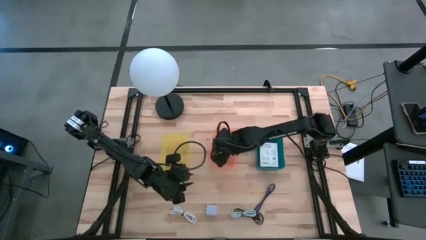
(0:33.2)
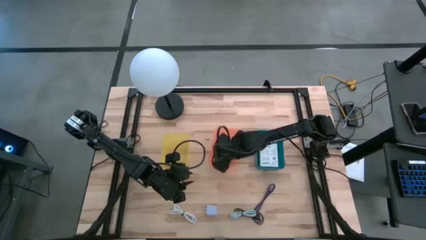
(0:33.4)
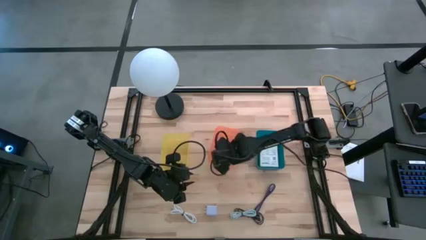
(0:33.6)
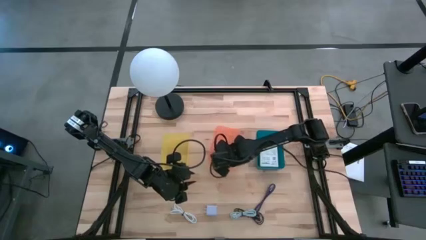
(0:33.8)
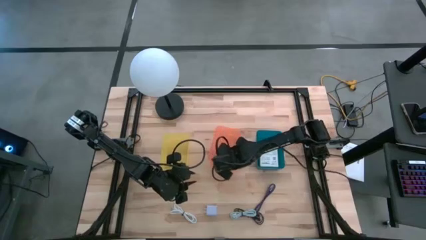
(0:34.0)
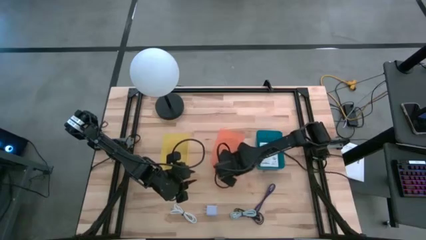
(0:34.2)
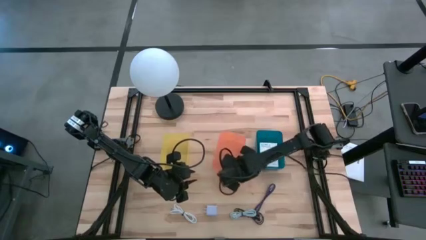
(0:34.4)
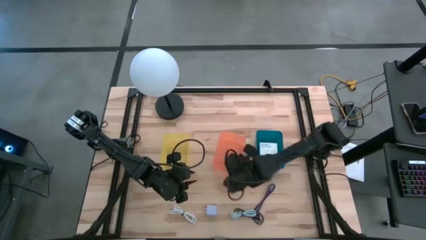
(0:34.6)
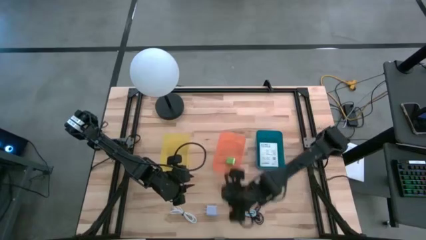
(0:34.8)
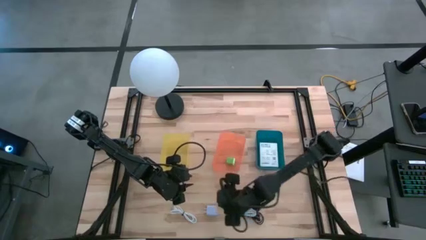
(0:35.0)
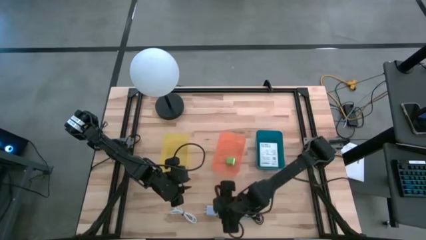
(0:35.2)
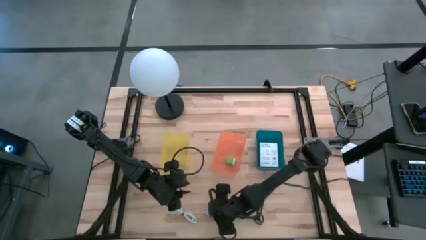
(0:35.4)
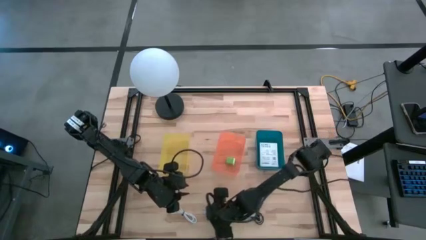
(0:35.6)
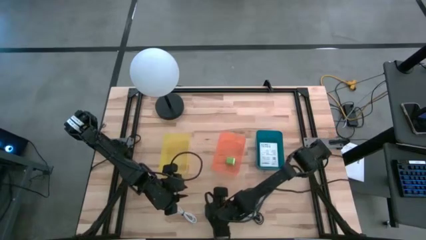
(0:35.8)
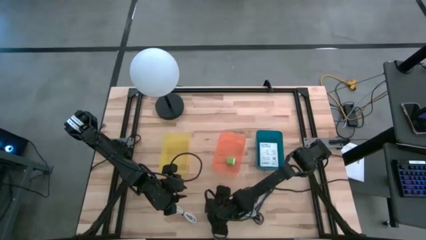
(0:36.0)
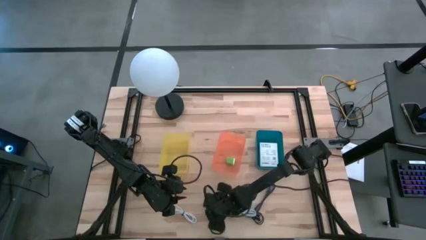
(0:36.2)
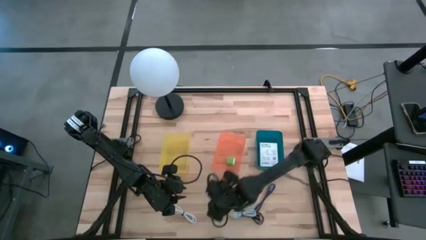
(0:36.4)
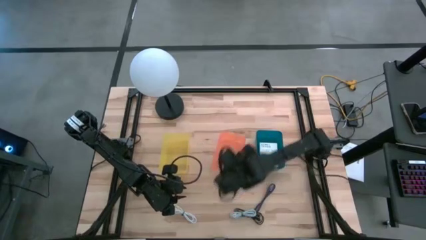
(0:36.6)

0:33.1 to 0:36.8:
Task: Pick and place items into bin
Put the blue charger adapter into the orange bin

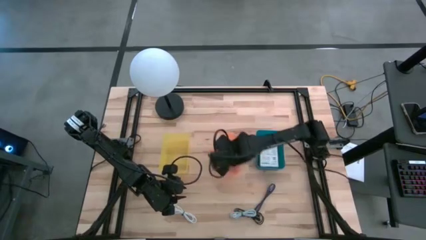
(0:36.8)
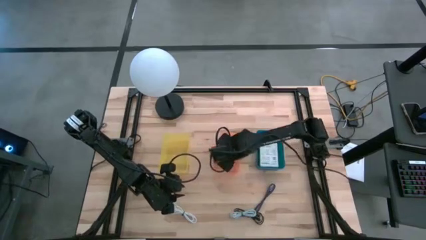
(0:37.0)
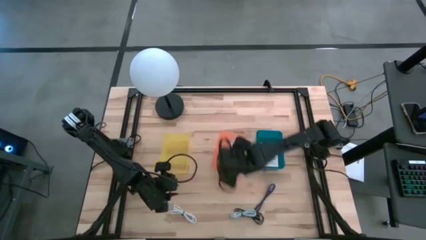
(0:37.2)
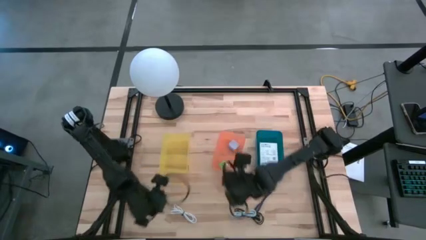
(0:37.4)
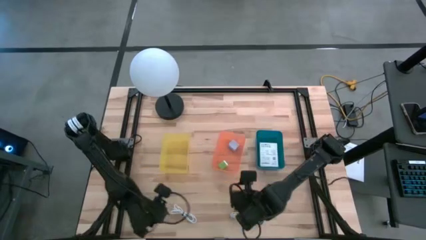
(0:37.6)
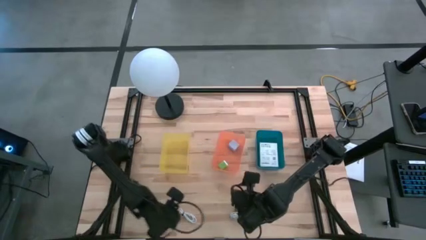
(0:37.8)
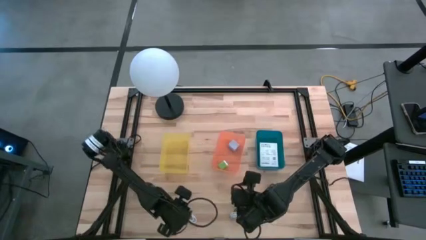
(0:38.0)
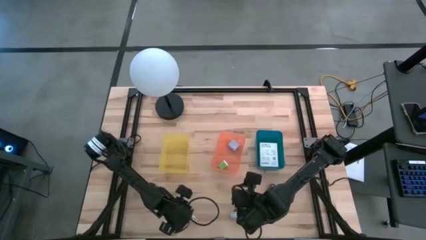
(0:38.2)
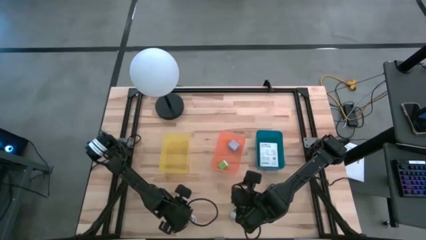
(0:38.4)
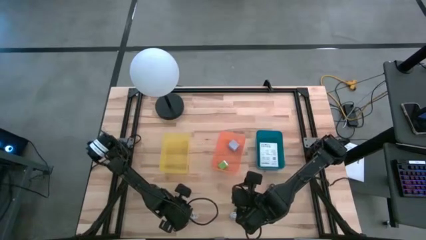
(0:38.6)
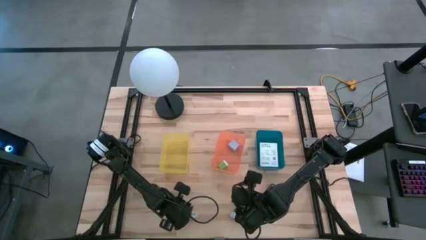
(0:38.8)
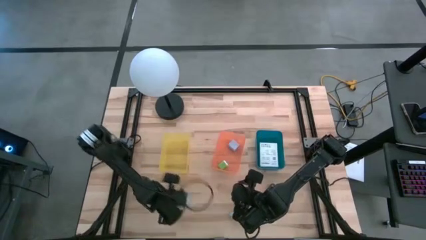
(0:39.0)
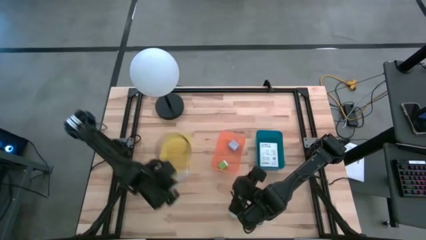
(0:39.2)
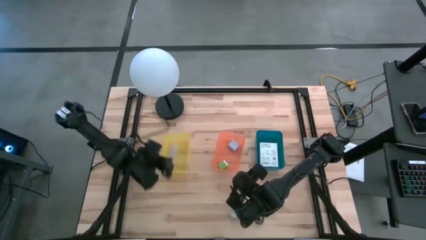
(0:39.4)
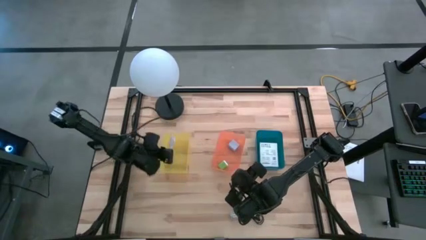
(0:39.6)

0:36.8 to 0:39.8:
Put the white charger cable into the yellow bin

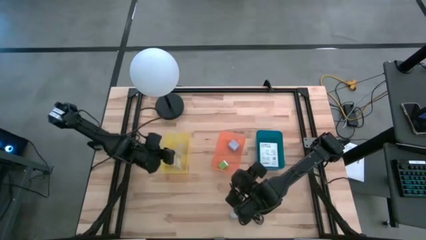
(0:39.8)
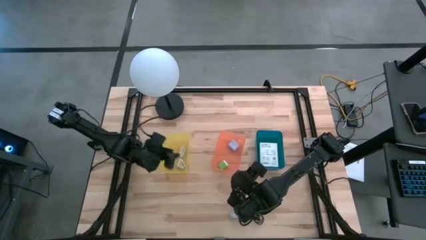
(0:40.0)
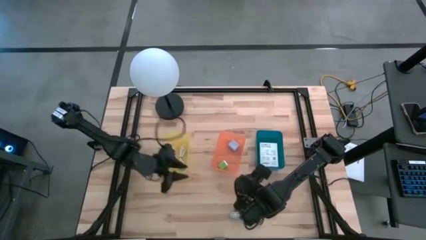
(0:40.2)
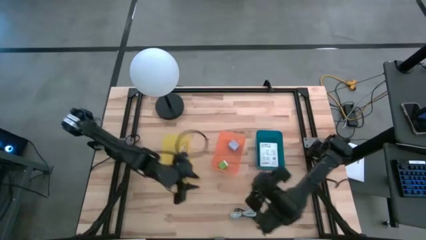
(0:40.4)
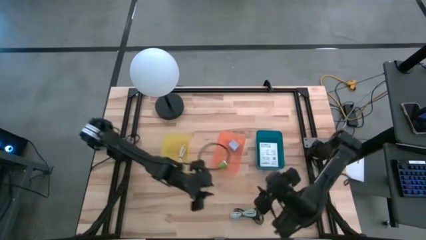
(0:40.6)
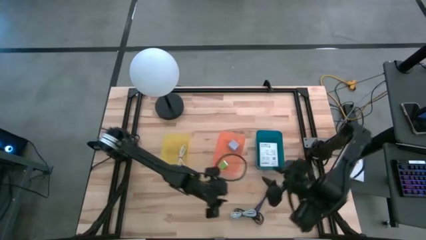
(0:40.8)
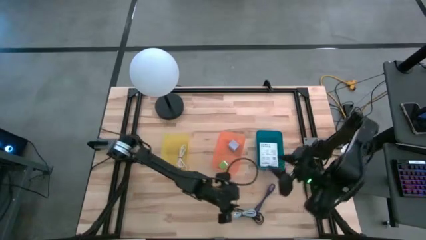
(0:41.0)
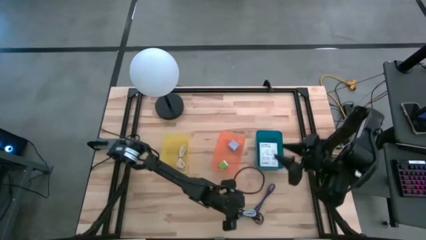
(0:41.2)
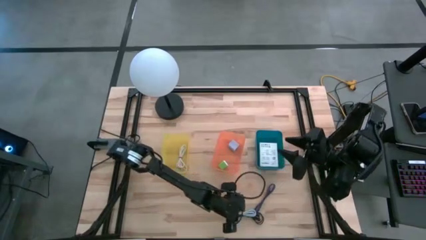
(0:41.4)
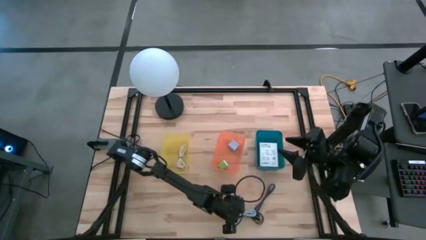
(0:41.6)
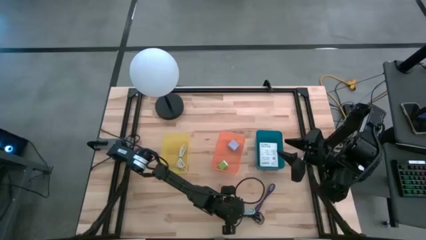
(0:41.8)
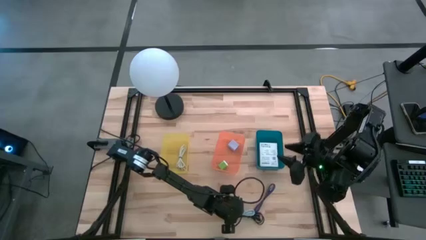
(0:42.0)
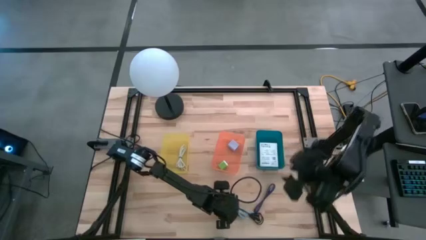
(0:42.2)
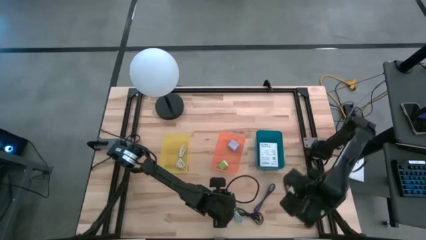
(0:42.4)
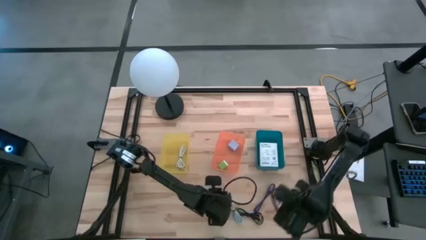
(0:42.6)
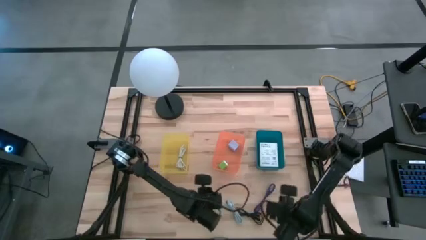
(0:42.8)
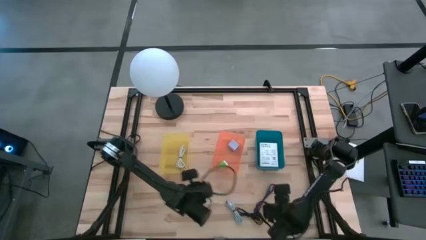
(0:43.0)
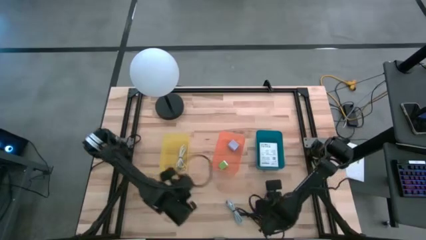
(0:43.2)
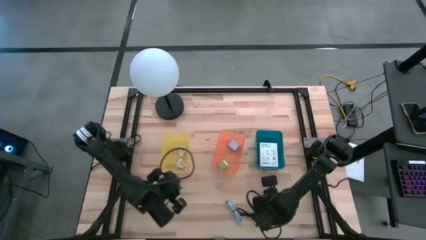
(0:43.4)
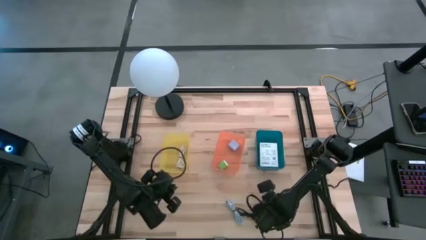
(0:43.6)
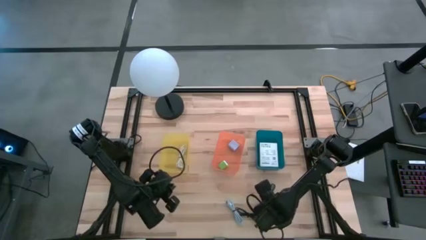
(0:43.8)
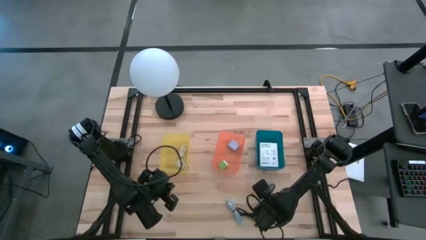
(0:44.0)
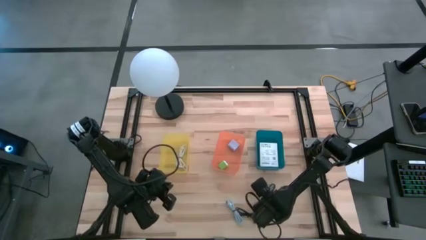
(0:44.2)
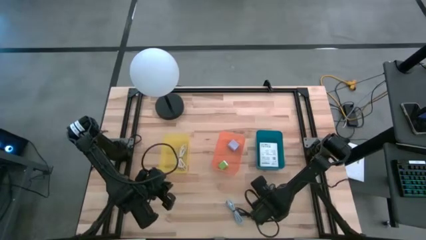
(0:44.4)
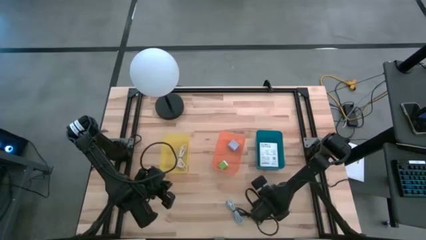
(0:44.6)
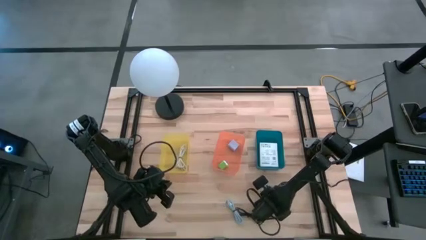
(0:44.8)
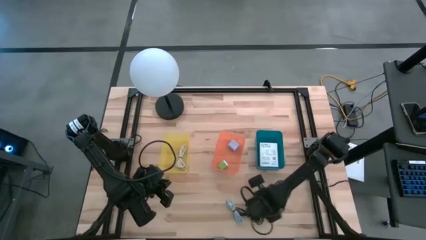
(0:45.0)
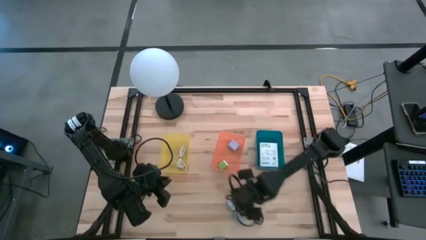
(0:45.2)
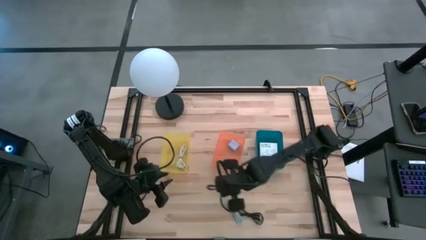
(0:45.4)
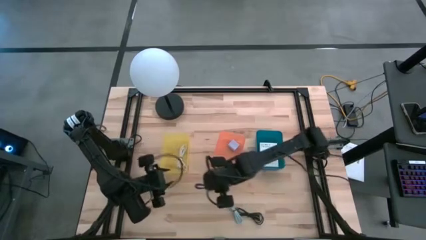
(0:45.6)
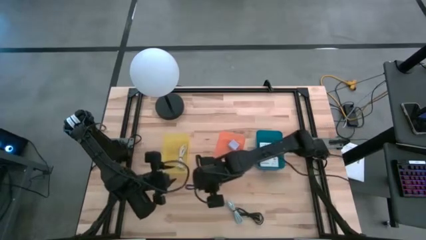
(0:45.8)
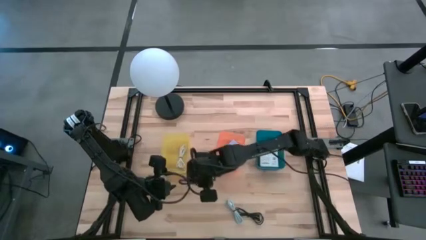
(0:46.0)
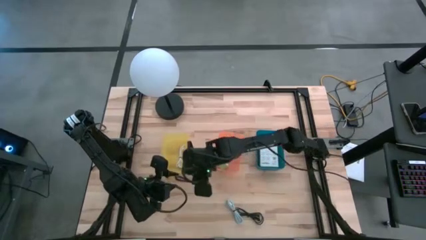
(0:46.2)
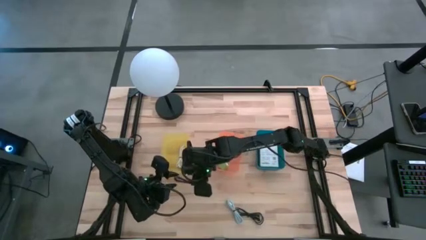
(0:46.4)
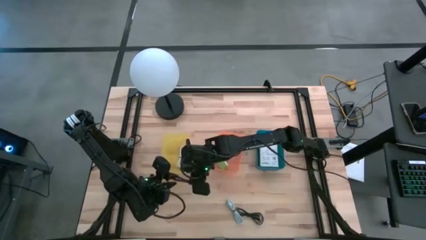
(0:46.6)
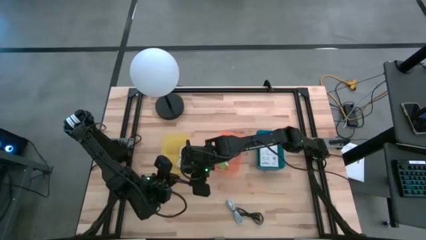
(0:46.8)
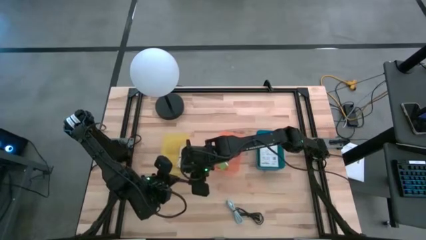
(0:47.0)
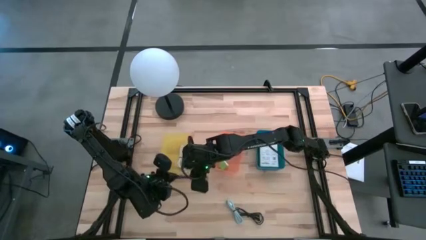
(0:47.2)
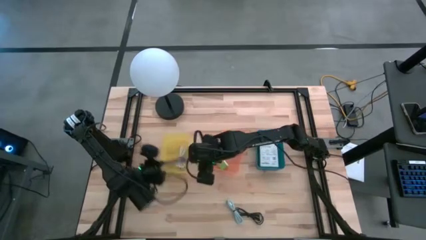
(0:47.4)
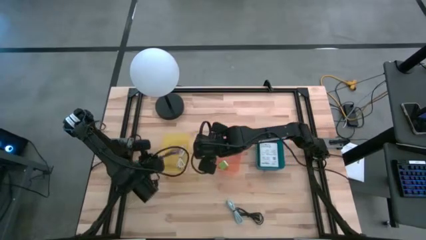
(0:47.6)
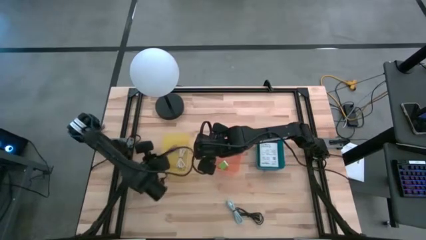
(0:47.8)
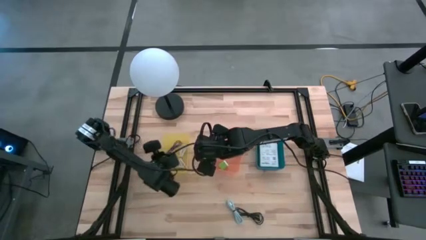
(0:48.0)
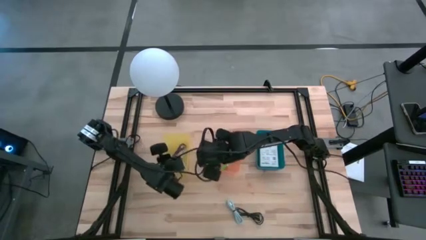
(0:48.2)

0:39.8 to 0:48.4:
Put the blue charger cable into the yellow bin

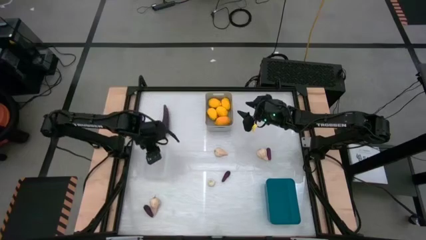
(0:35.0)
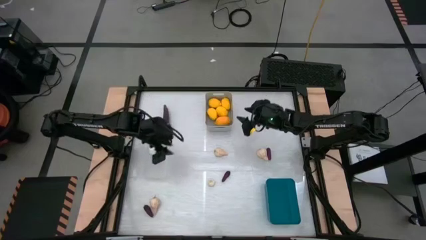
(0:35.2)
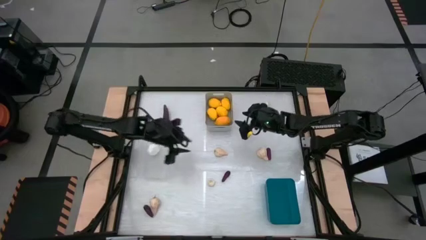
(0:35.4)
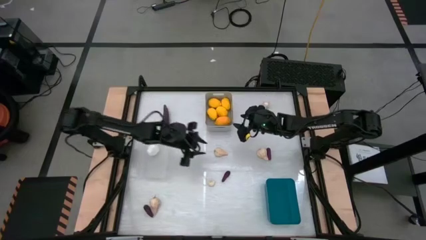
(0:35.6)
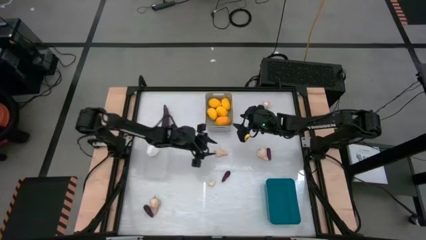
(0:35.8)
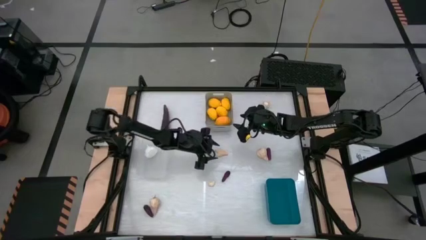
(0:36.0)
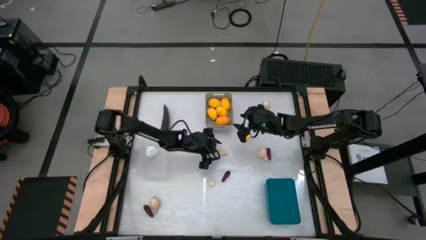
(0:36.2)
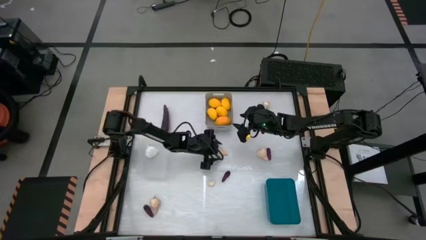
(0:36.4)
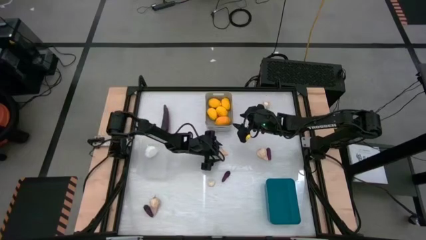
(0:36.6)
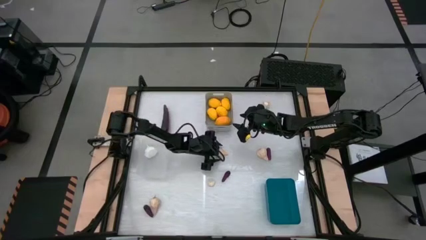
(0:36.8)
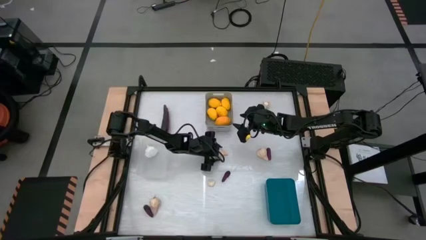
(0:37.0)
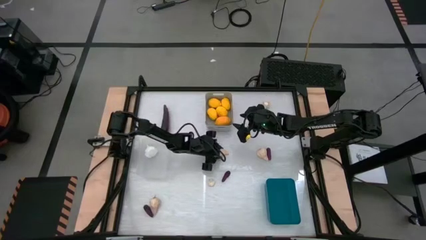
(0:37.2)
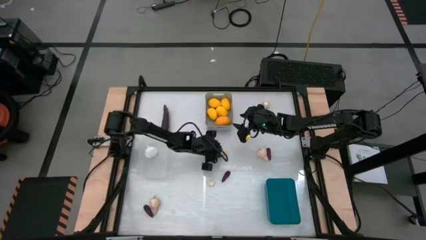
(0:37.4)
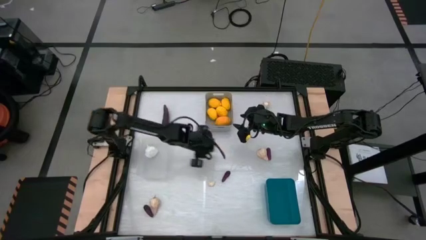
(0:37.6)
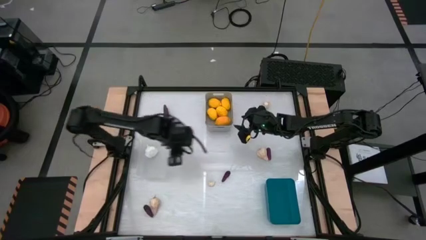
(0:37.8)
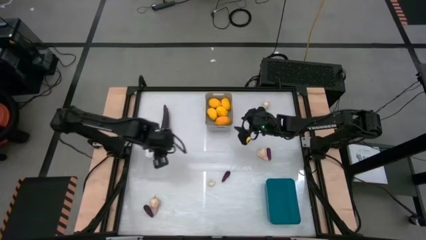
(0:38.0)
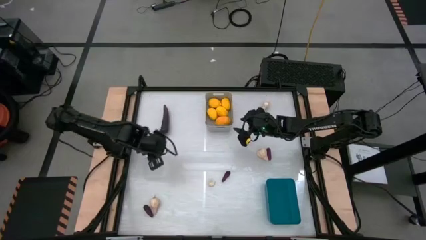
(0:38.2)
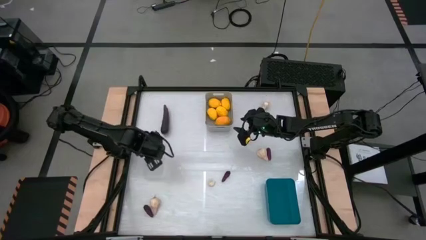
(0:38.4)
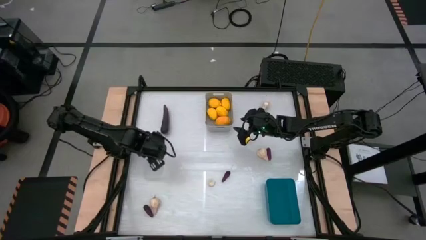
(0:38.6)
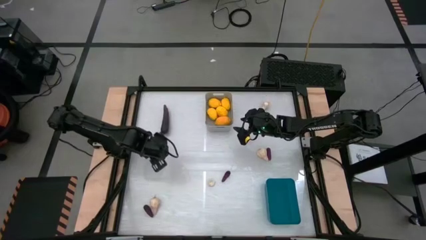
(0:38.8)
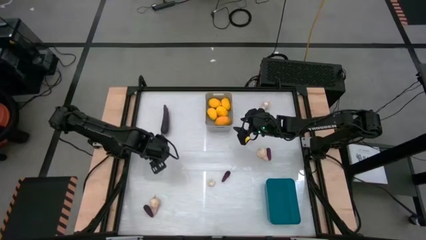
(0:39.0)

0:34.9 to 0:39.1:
Task: Sort produce into baskets
Put the garlic into the transparent bin
